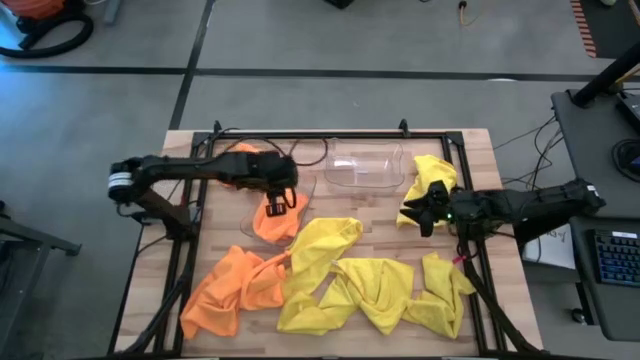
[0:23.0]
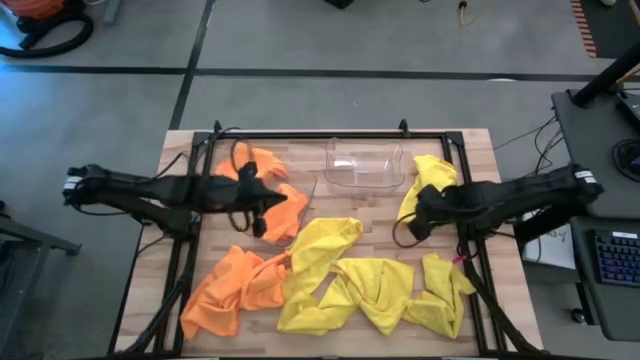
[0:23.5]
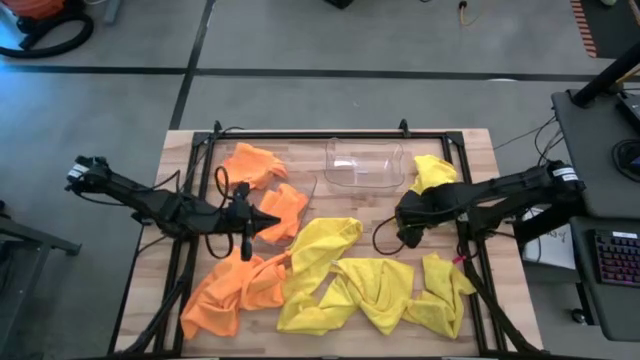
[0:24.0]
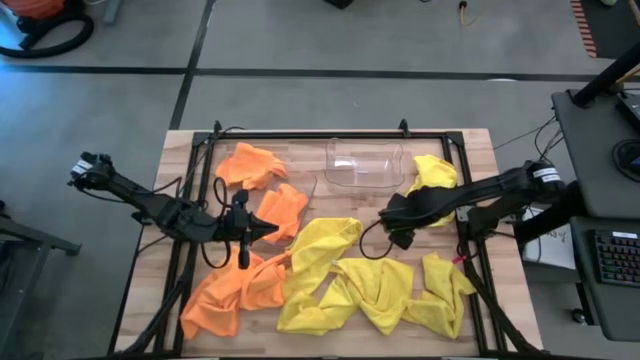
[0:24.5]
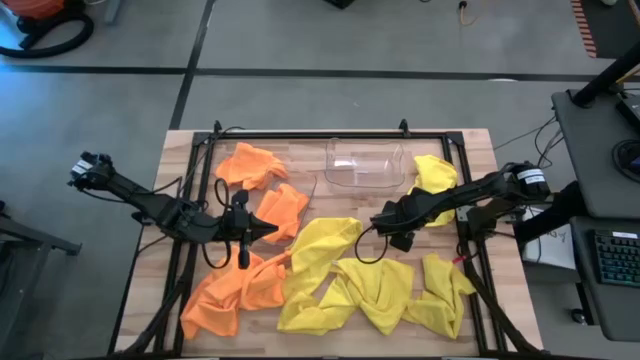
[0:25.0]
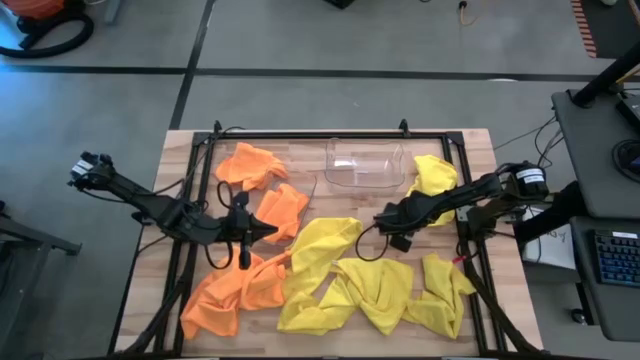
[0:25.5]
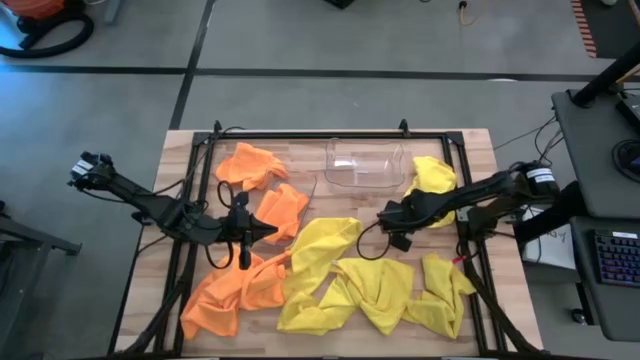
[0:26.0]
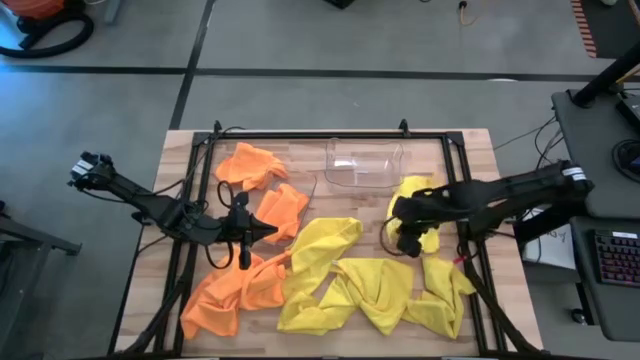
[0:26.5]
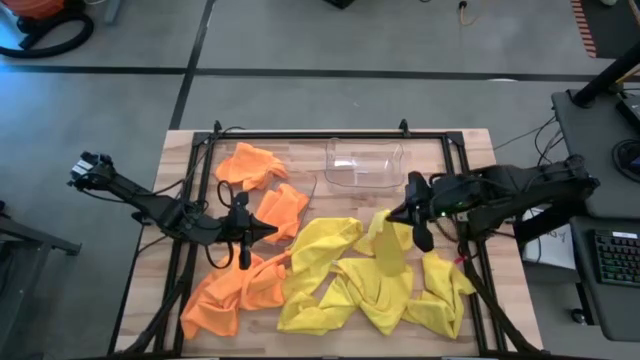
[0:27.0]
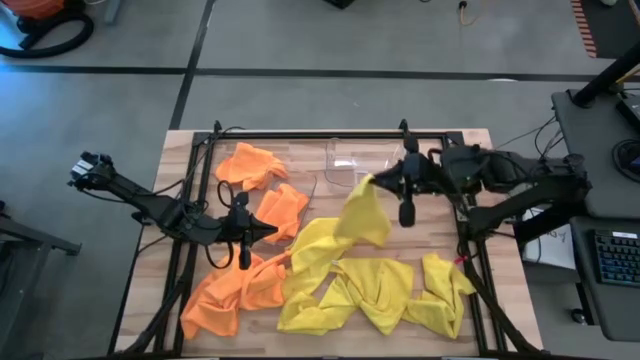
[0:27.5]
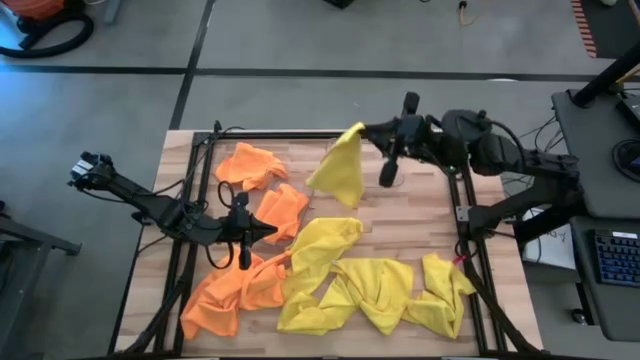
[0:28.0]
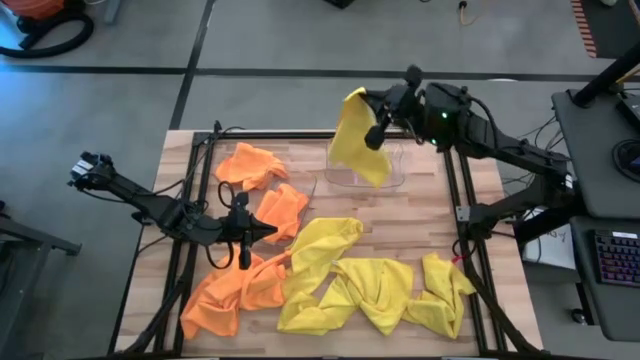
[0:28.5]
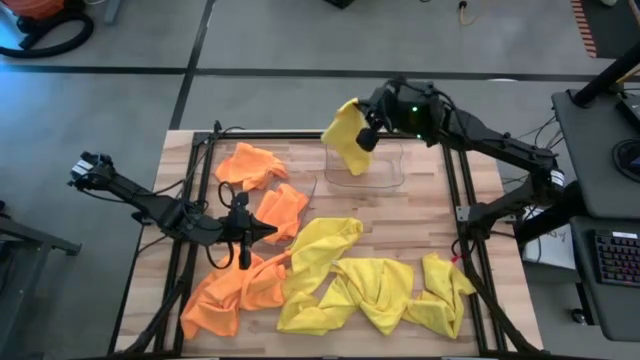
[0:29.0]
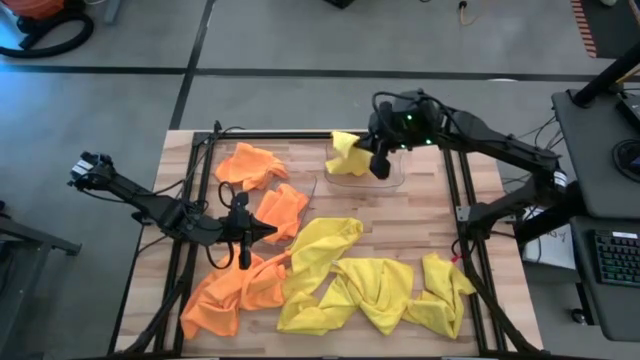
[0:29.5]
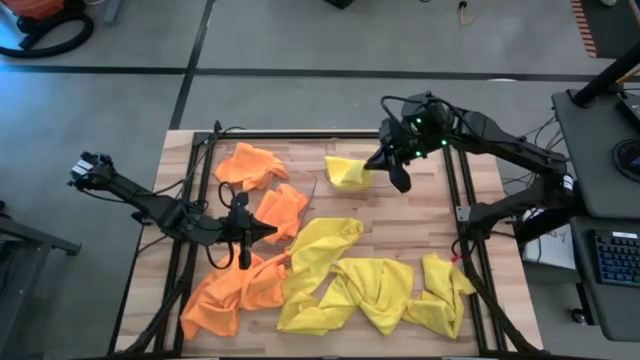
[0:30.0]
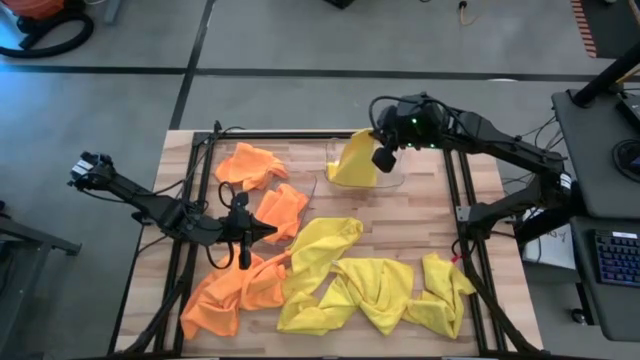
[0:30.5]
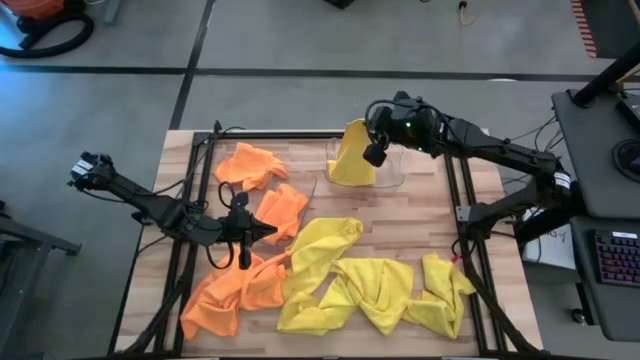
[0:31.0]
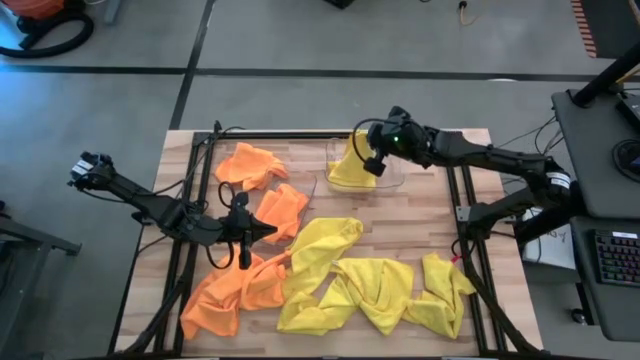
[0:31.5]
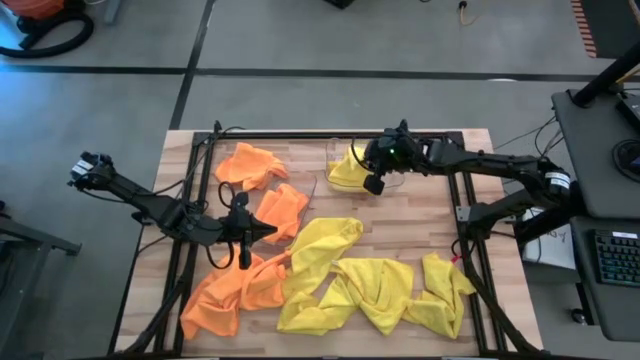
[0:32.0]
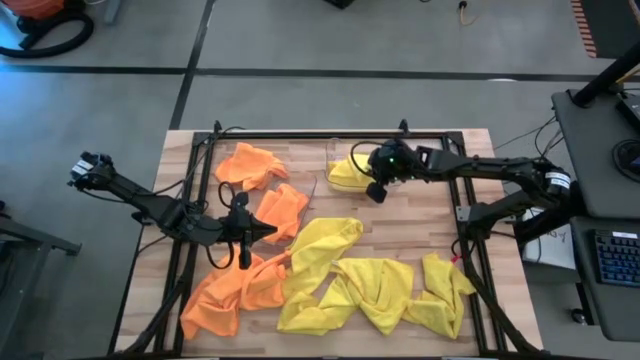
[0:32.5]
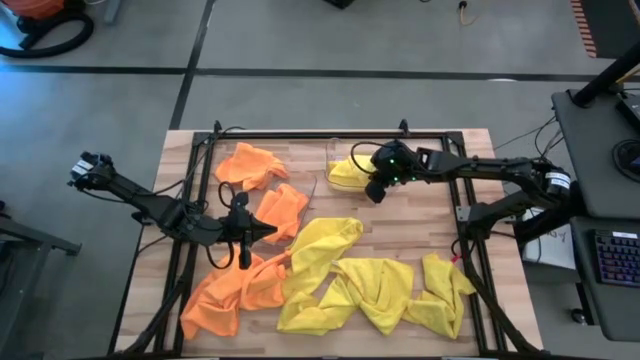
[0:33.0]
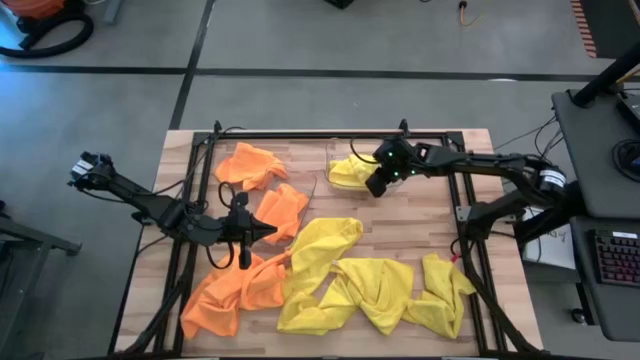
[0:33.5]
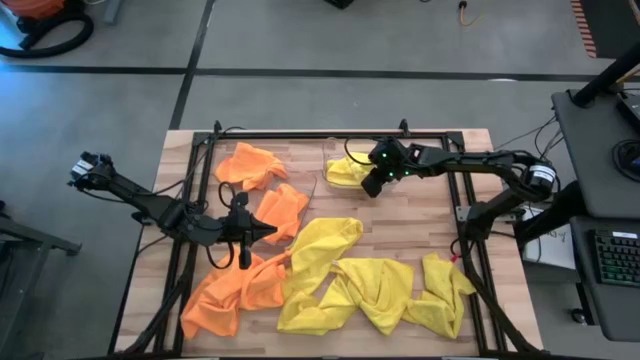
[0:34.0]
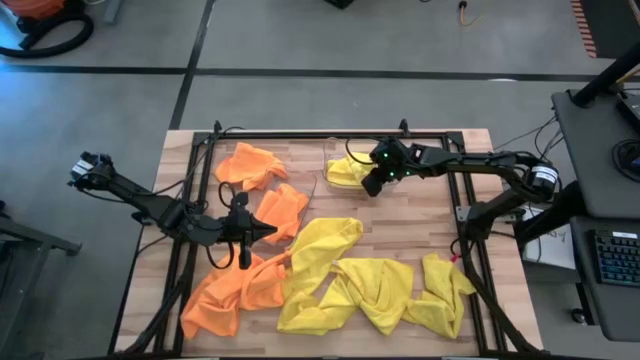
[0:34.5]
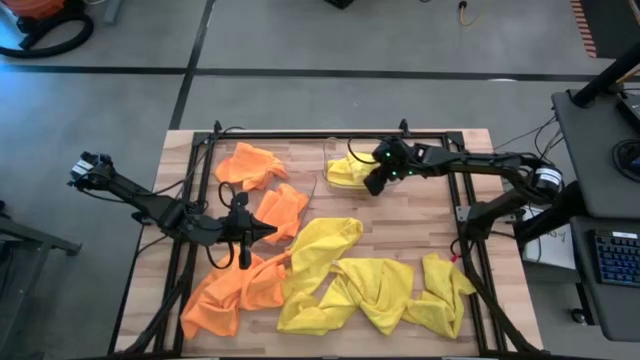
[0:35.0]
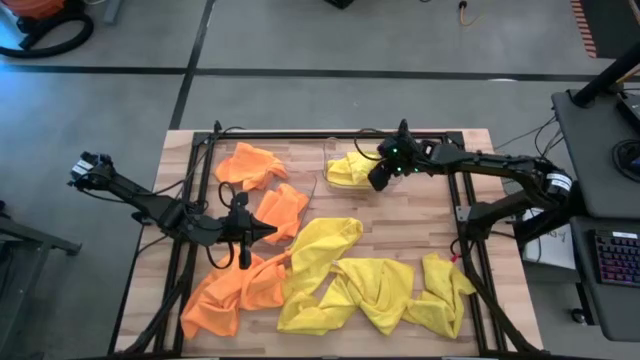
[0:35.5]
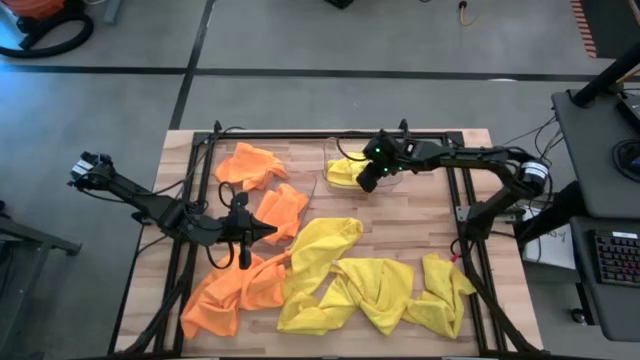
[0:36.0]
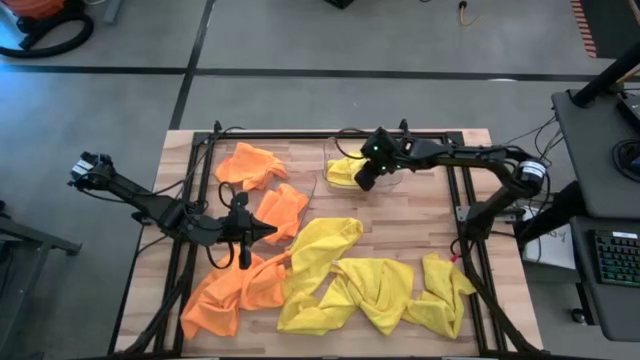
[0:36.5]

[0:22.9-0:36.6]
Task: Sort microfiber towel by color & place in baskets
Put the yellow microfiber towel into the right transparent bin

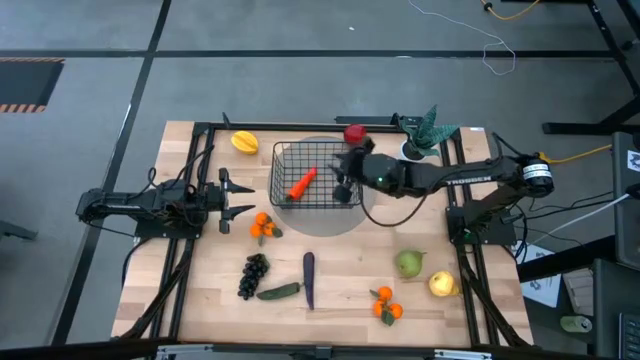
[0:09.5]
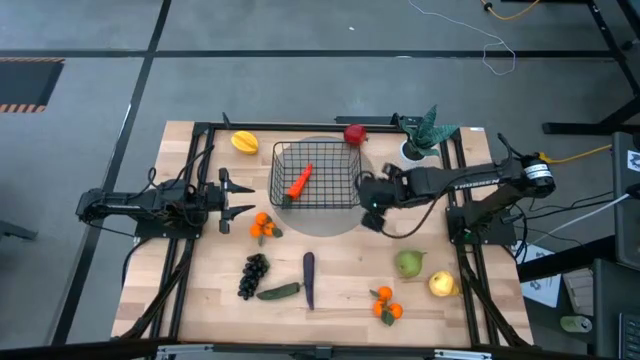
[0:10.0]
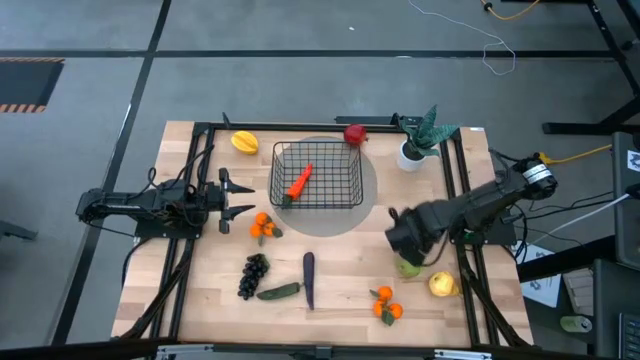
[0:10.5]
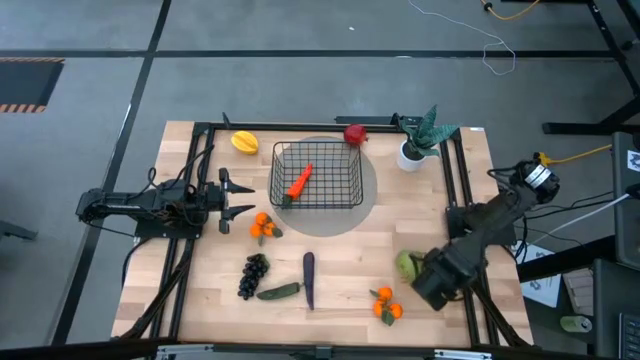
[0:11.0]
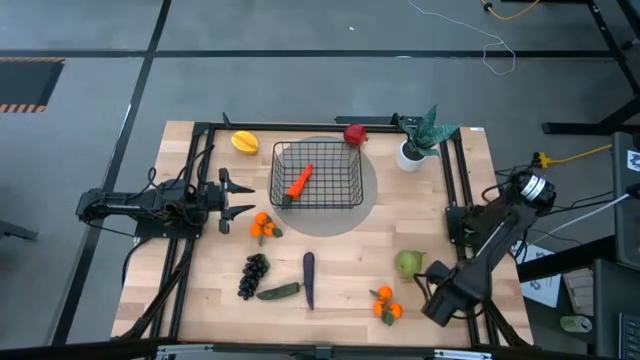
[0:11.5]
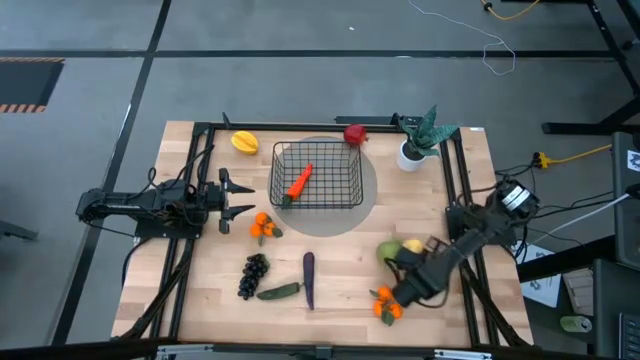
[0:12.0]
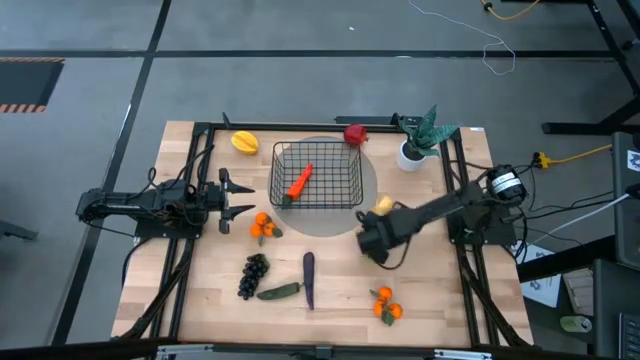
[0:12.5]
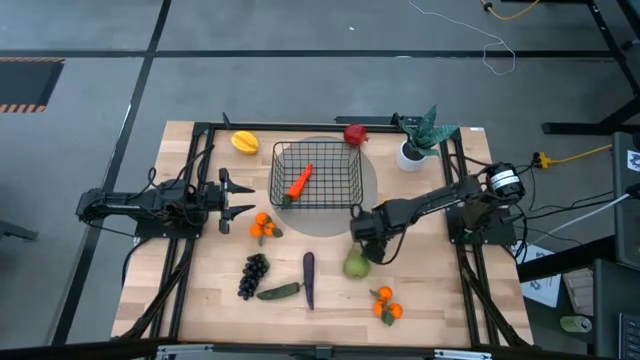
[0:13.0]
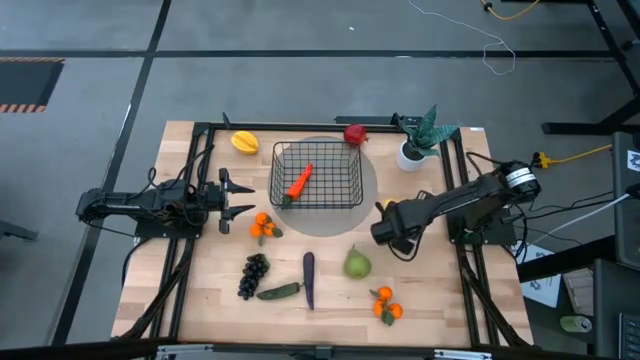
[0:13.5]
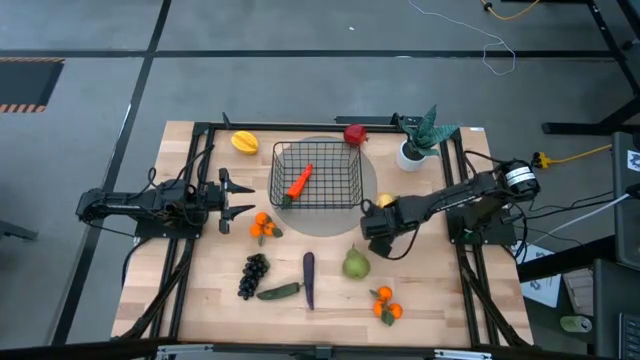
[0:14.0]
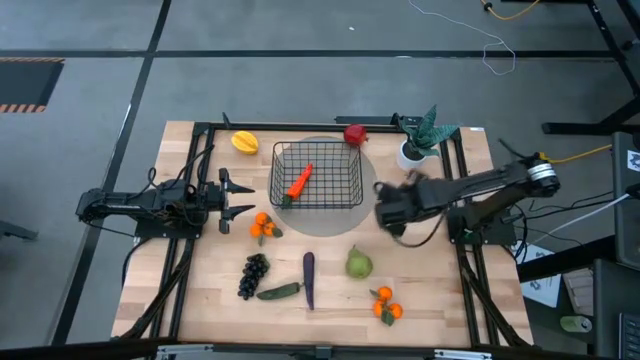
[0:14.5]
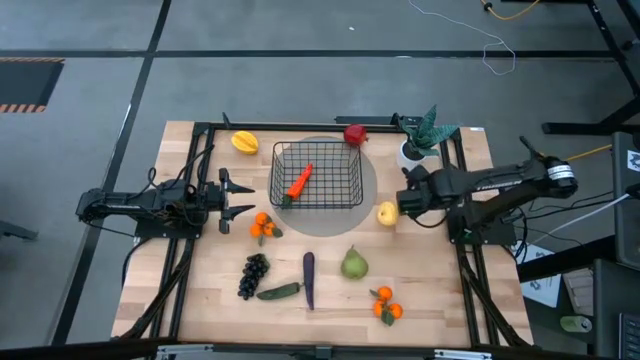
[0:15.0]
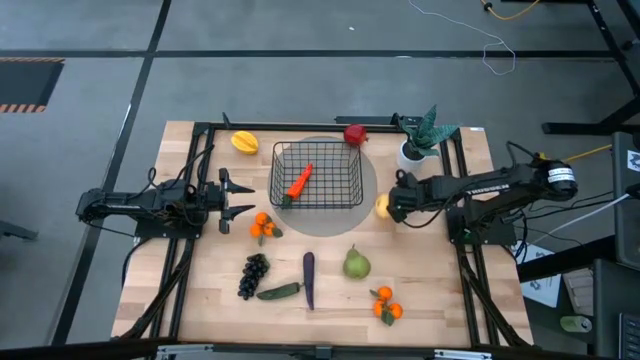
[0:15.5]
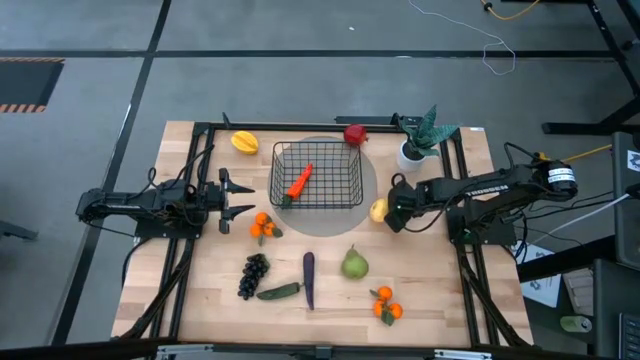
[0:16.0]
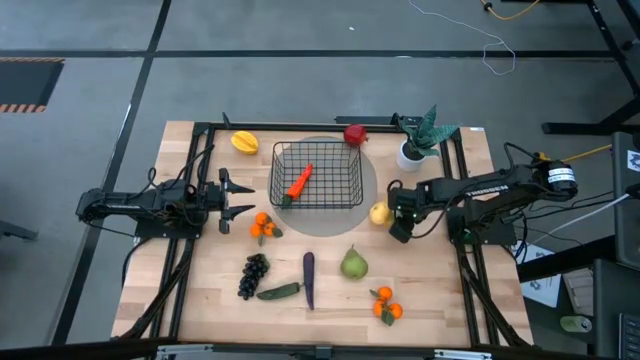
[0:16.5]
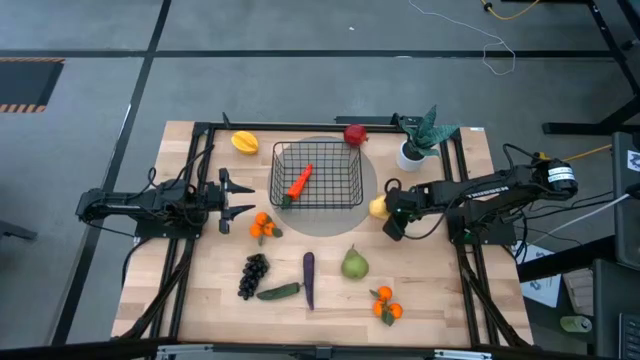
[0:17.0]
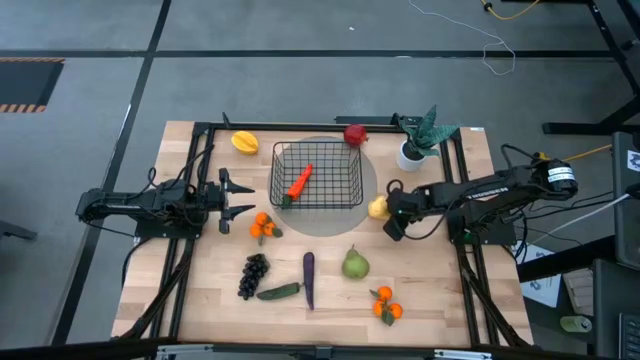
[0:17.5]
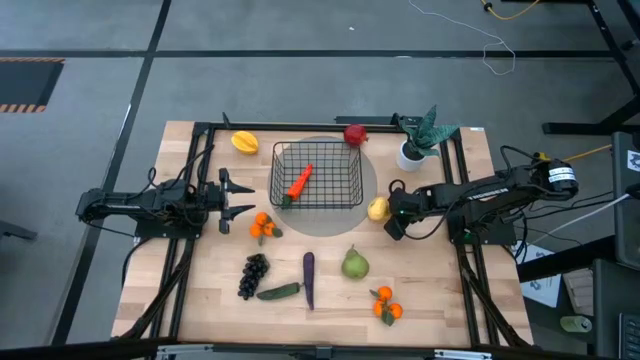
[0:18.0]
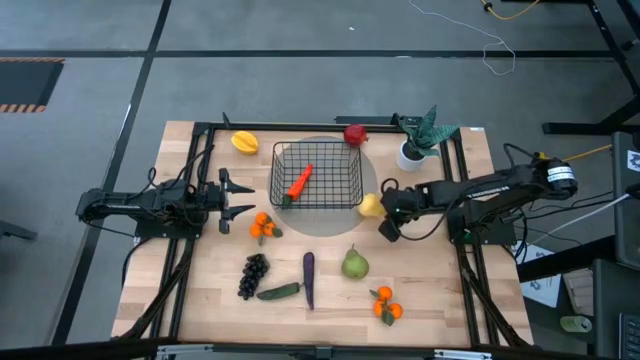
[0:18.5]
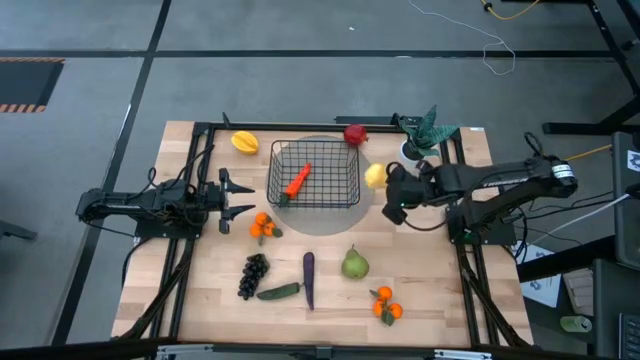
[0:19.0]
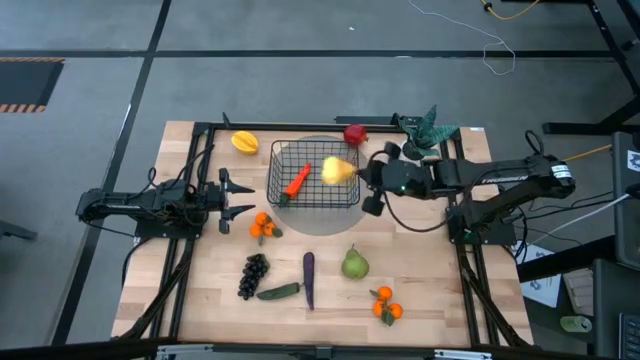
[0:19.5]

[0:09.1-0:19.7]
Task: Build produce basket
Put the yellow pear into the wire basket
